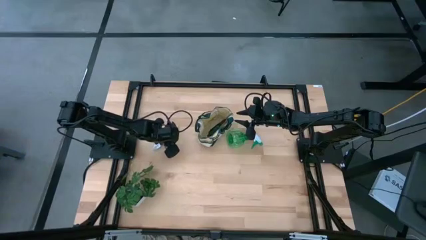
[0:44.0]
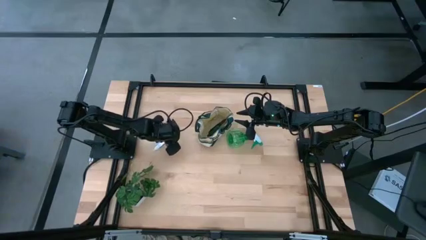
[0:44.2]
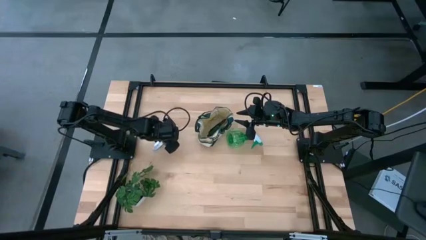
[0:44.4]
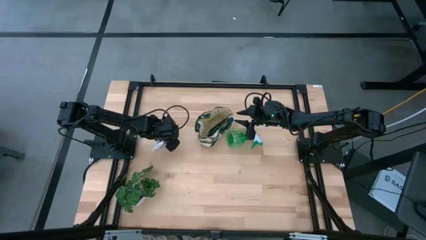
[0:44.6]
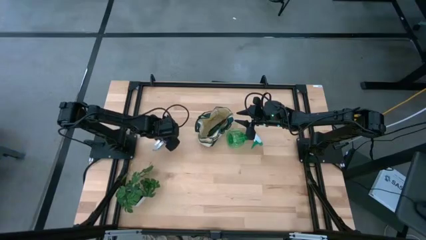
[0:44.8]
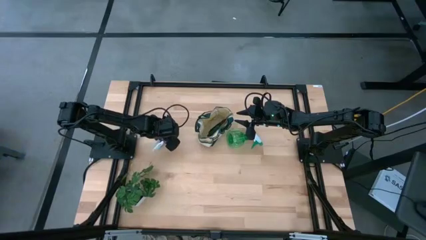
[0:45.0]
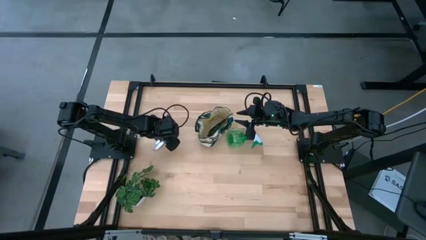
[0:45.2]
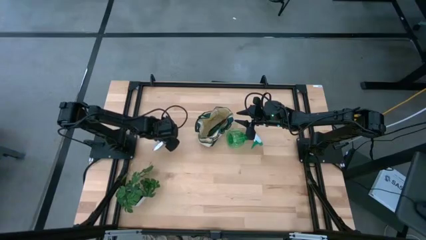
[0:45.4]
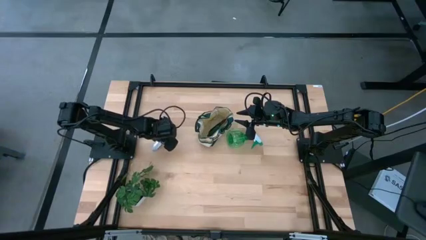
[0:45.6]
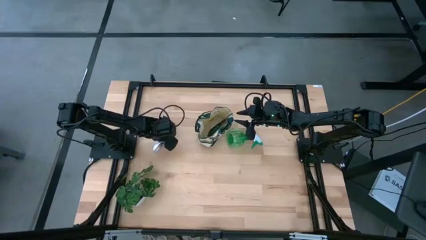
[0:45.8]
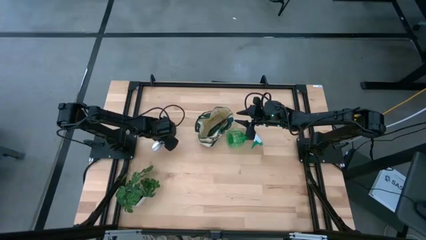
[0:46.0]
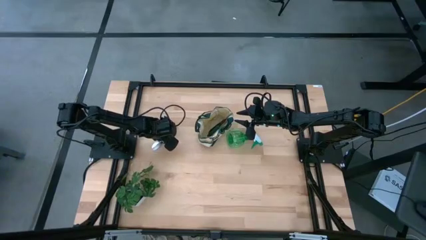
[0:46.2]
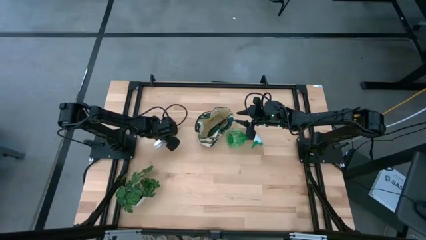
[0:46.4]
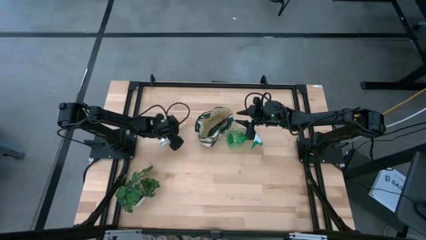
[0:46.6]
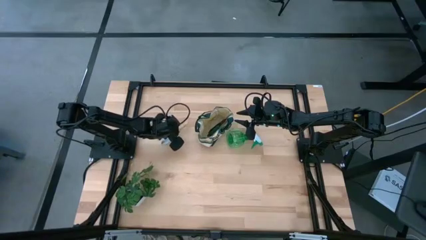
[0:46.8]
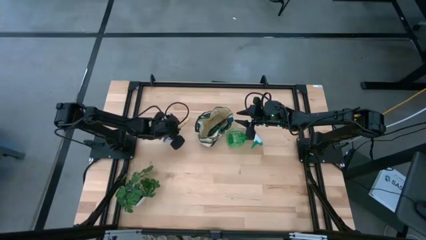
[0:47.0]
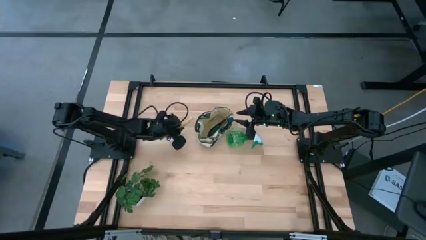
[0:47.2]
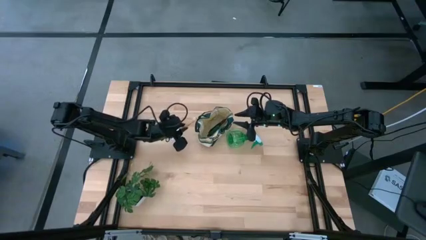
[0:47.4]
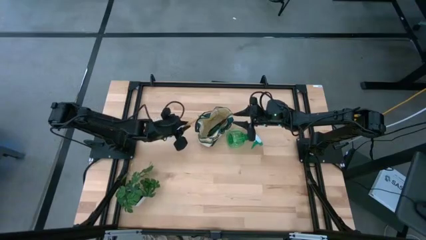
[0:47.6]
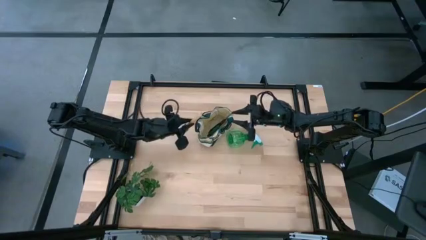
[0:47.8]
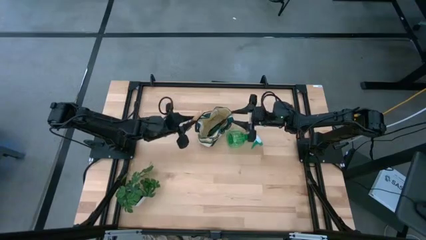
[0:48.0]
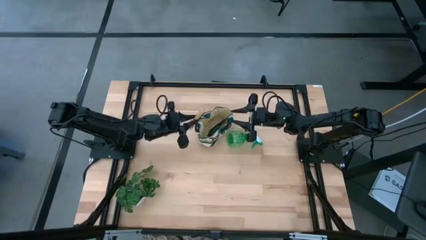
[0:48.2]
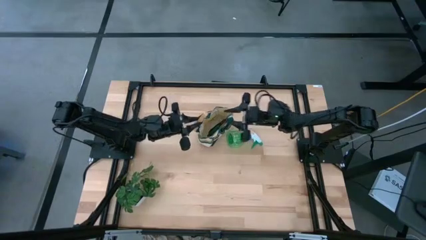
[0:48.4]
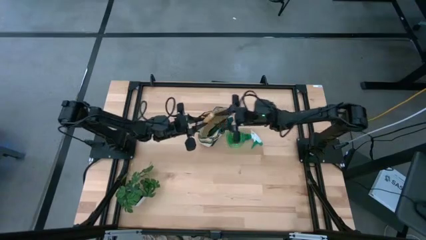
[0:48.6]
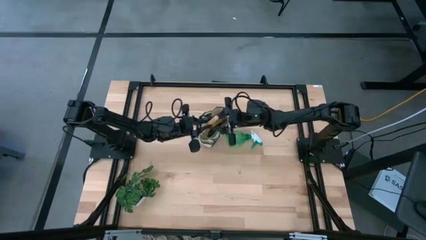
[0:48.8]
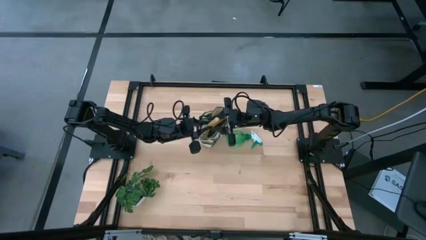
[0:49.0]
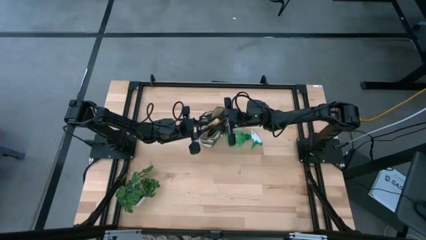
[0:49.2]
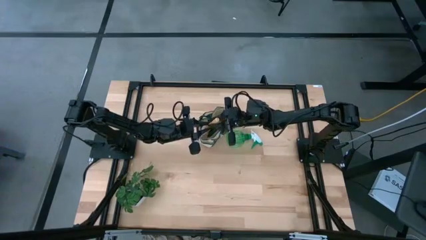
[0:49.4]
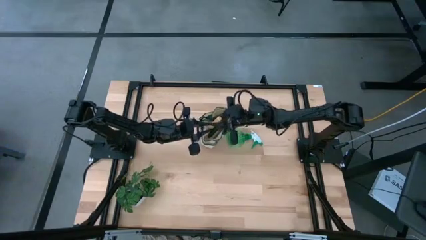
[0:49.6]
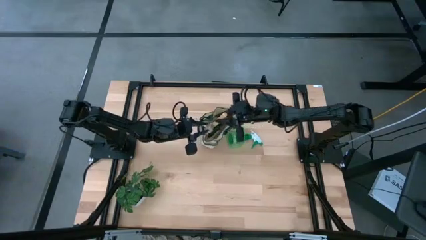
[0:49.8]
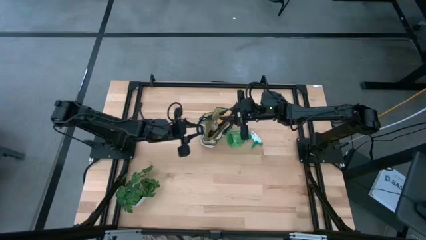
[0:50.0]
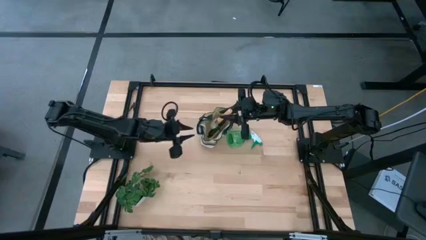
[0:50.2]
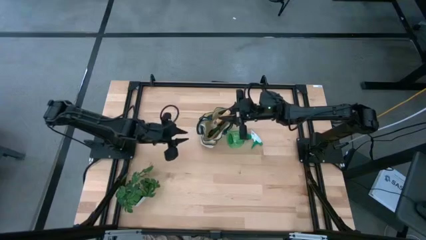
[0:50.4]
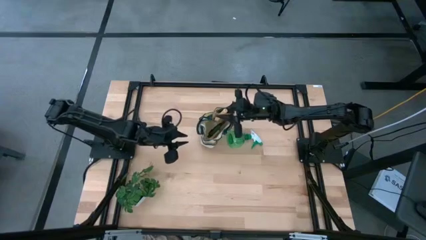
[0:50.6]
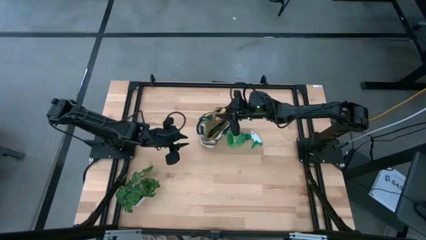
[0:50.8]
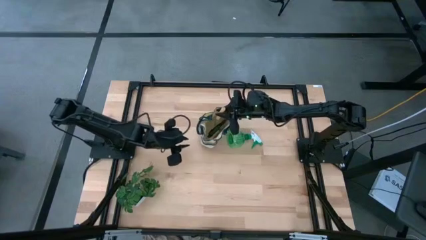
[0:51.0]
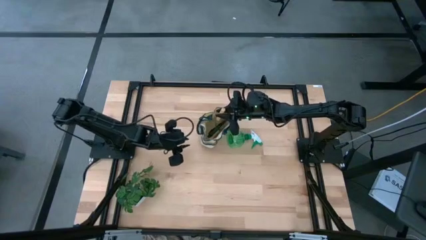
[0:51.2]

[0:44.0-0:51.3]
Task: Pick & Place Garden tools in Gardening bag
Put the brown trowel into the light brown gardening bag

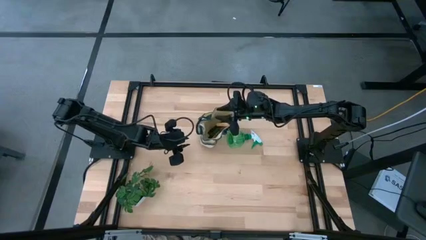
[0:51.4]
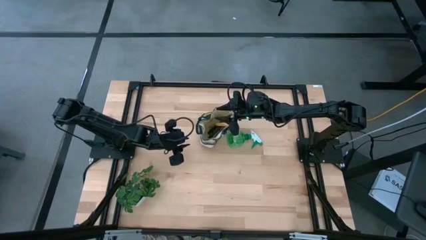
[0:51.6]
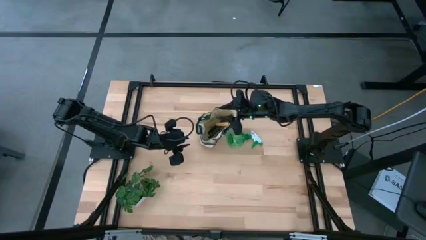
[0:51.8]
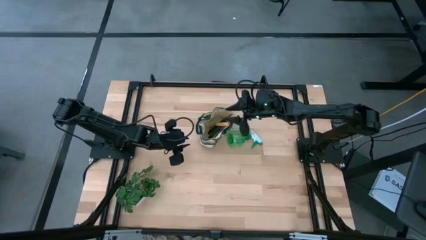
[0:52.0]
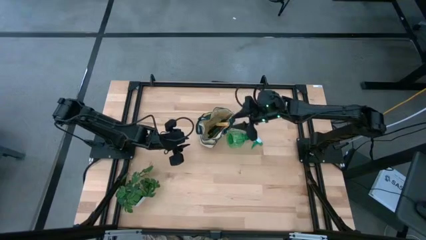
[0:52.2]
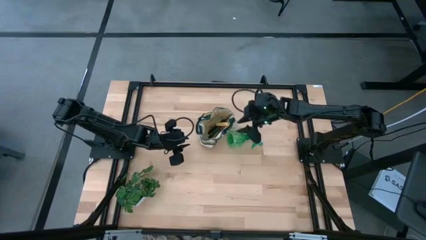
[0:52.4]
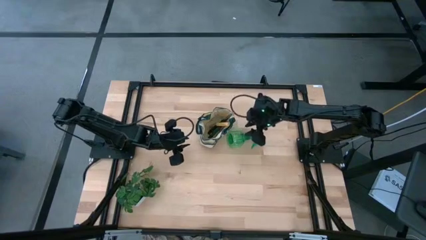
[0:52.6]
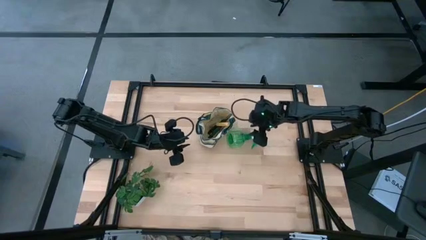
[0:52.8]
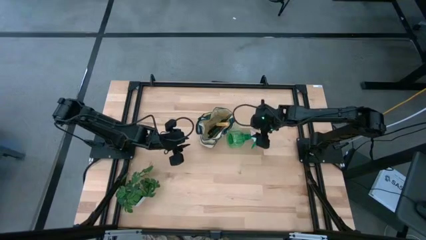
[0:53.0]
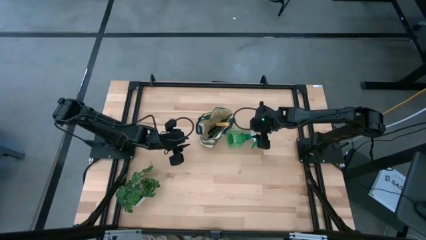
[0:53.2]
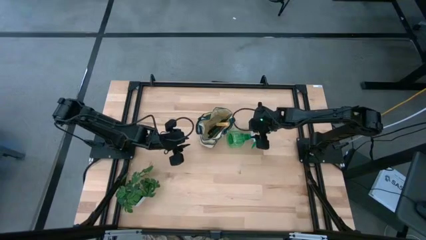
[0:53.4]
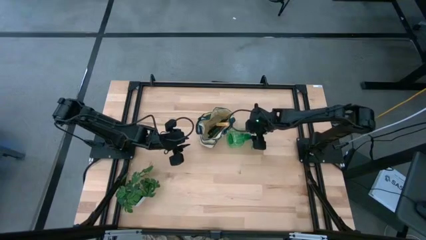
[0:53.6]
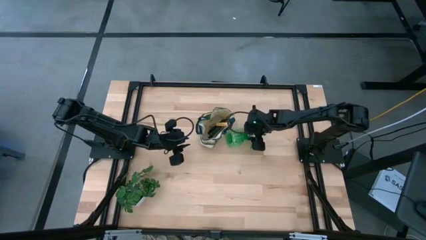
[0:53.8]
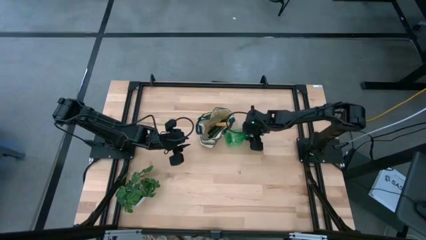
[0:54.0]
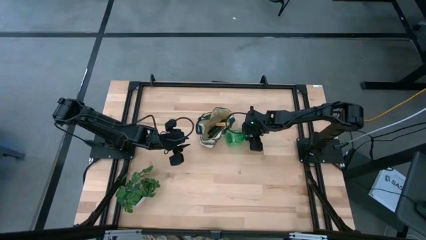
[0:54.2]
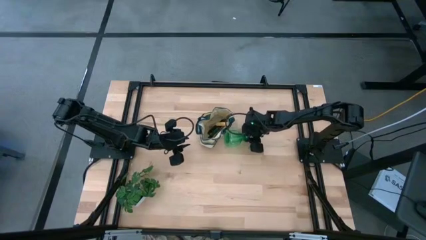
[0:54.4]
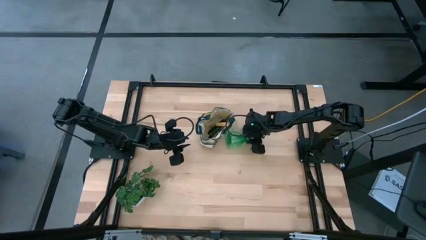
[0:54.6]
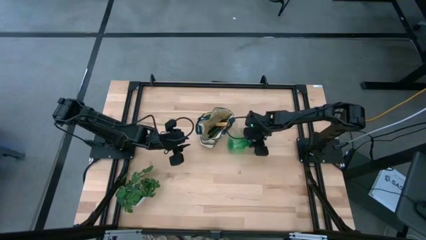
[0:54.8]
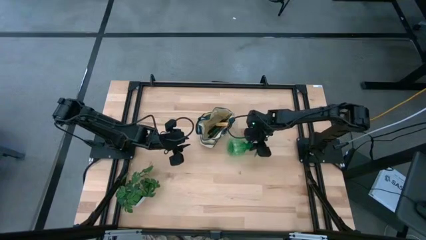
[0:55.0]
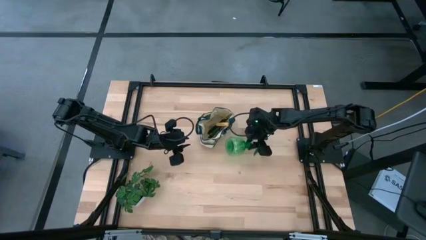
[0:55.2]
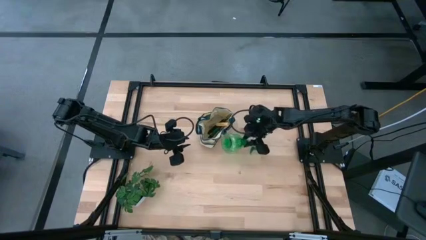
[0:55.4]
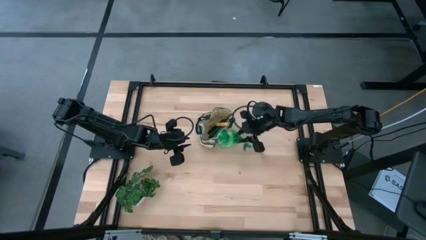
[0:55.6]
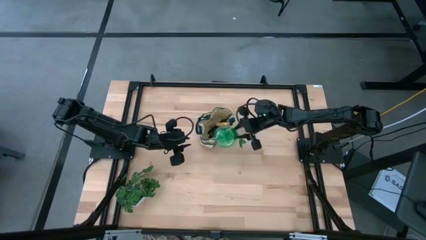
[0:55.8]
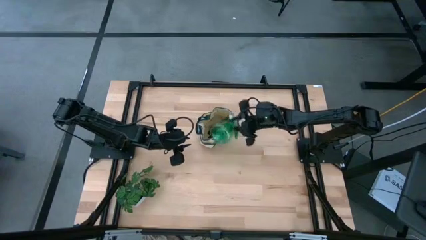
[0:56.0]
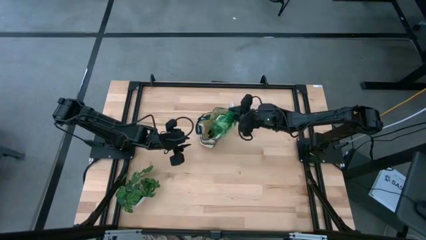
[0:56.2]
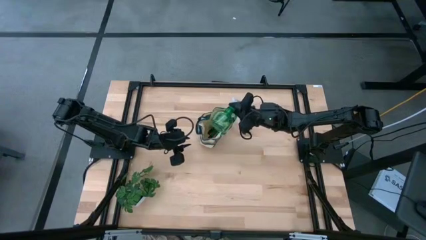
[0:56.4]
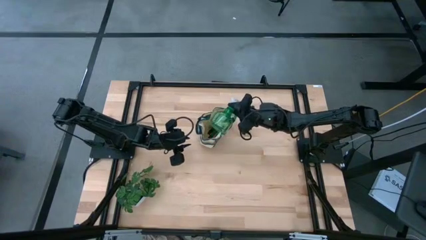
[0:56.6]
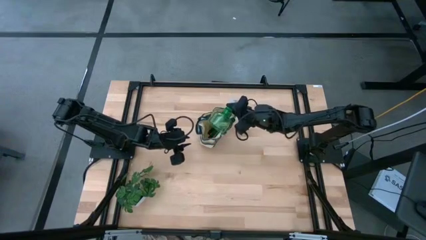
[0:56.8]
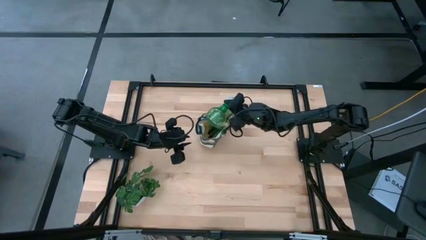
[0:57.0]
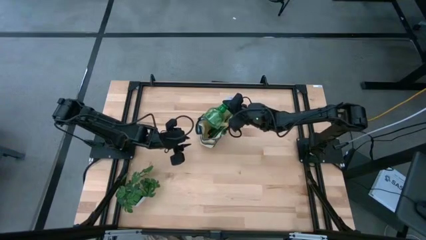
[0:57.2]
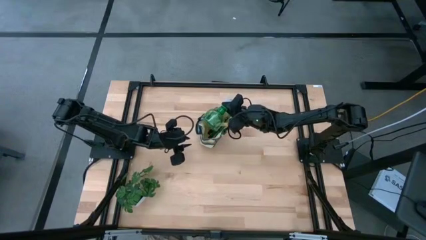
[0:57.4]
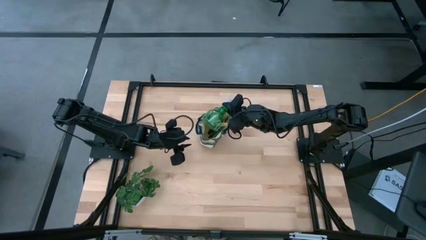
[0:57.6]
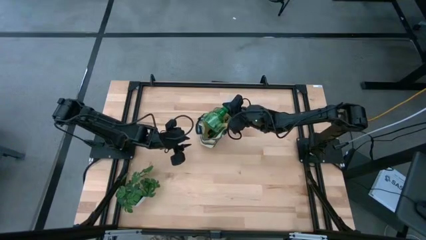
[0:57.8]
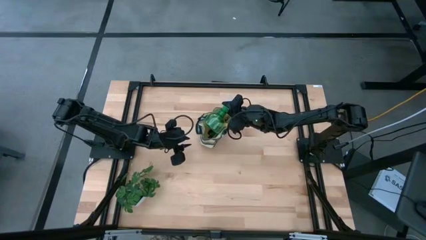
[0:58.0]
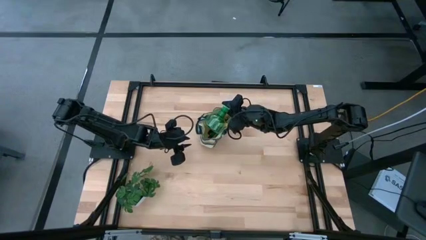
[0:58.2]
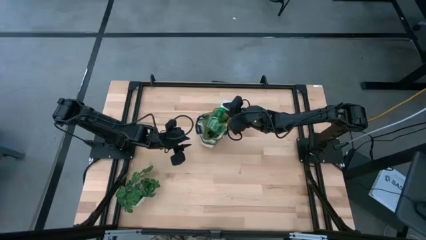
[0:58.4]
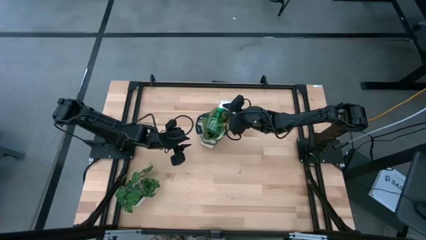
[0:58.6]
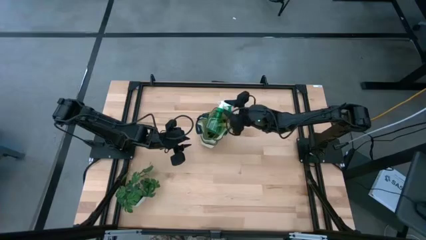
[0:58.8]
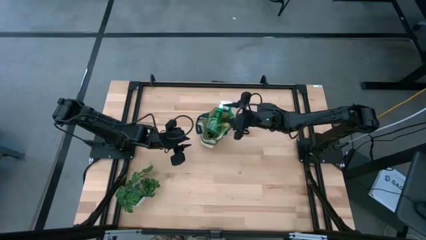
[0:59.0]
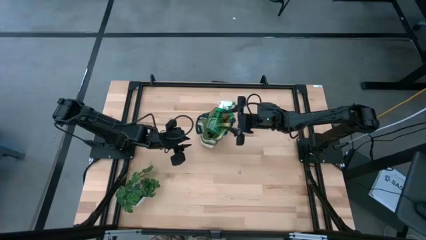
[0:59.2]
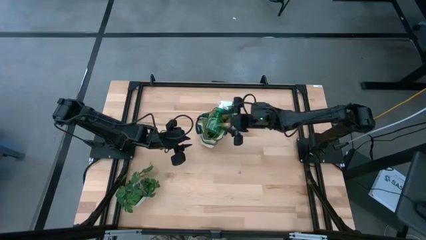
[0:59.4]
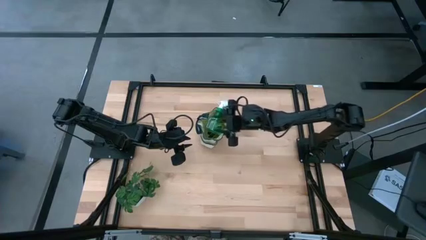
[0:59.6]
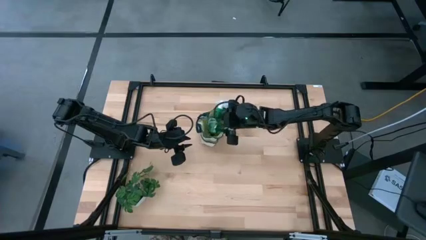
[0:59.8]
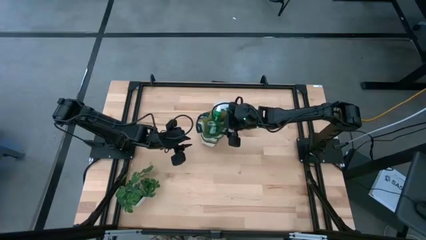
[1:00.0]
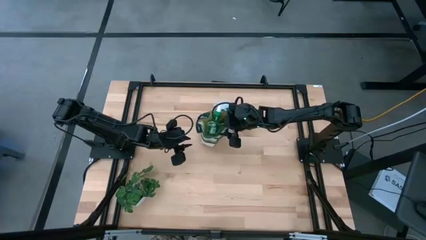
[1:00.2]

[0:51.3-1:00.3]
Put the green spray bottle into the light brown gardening bag
